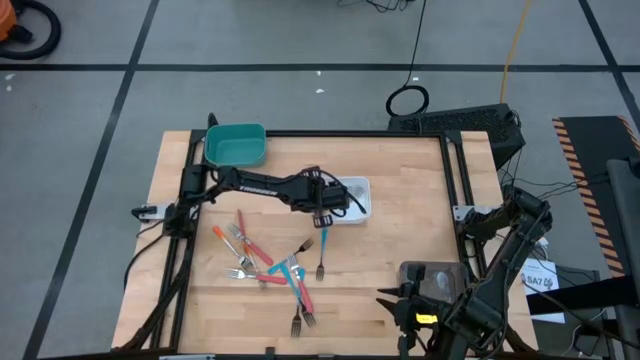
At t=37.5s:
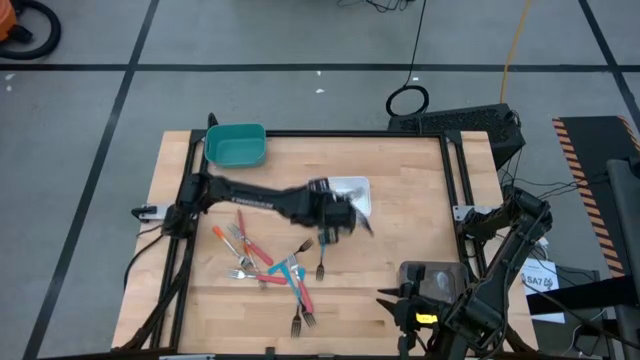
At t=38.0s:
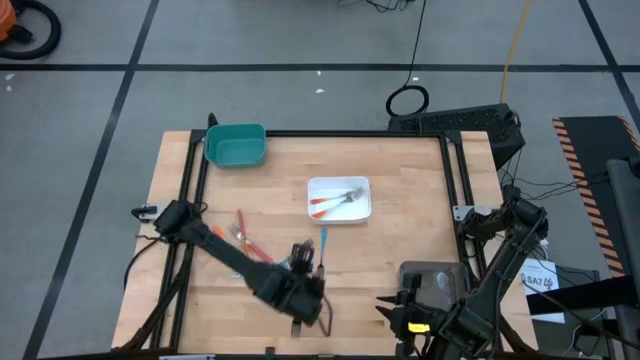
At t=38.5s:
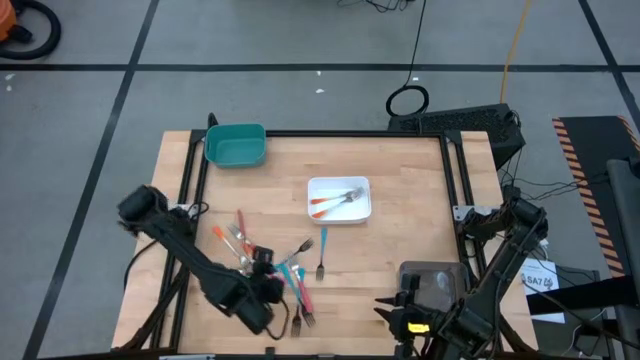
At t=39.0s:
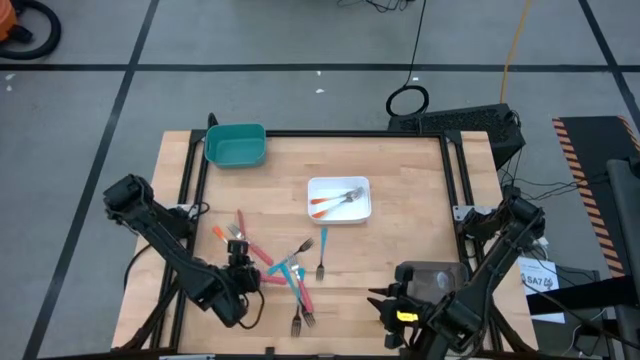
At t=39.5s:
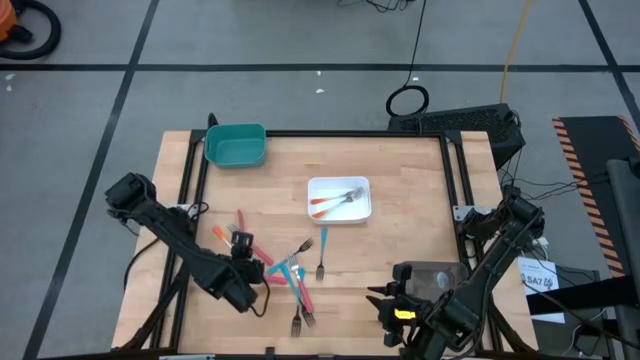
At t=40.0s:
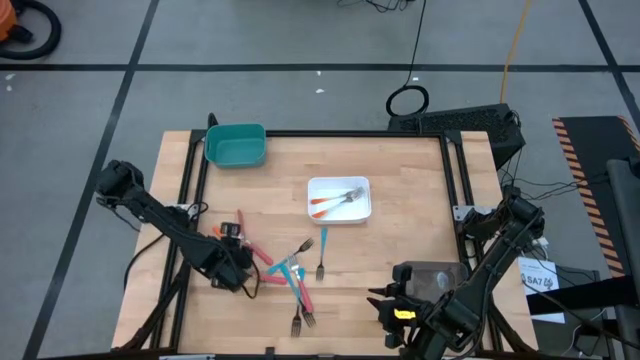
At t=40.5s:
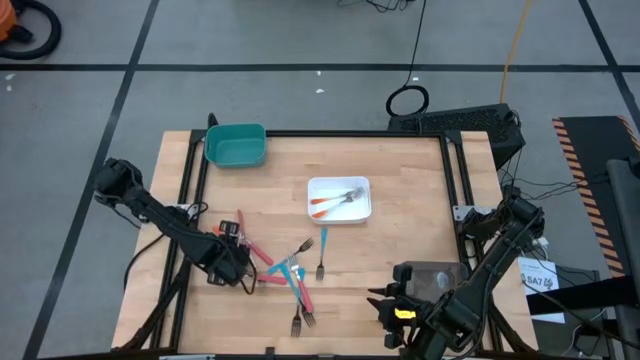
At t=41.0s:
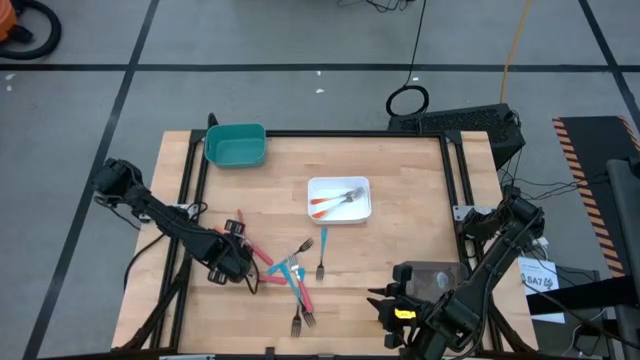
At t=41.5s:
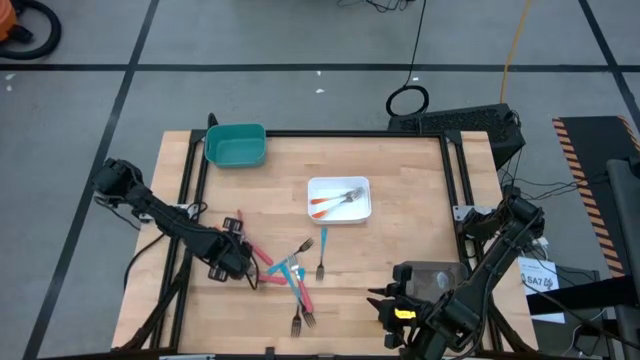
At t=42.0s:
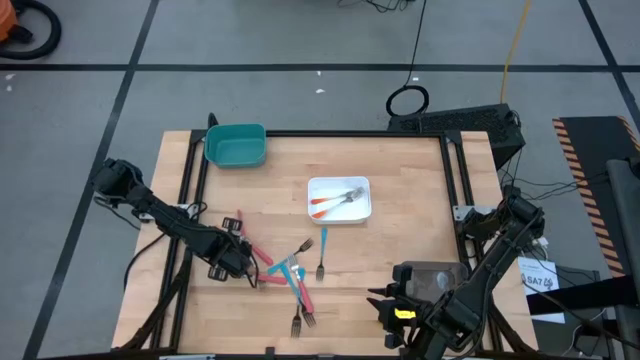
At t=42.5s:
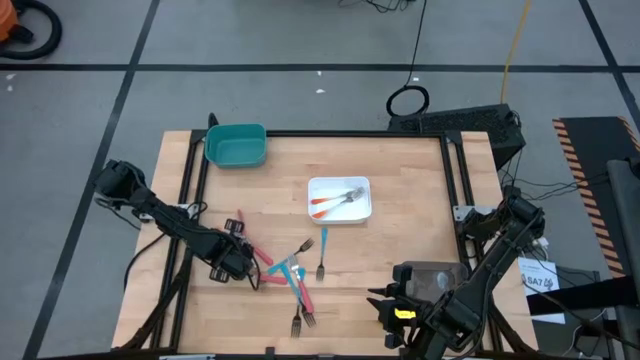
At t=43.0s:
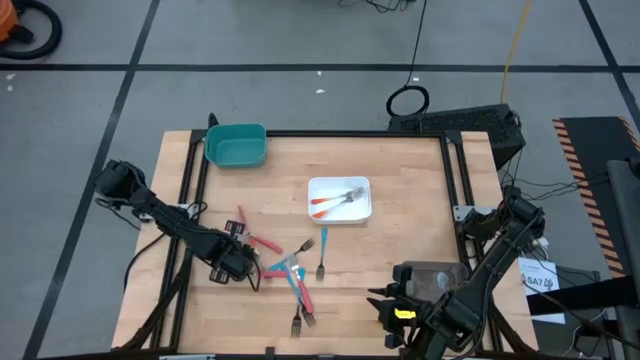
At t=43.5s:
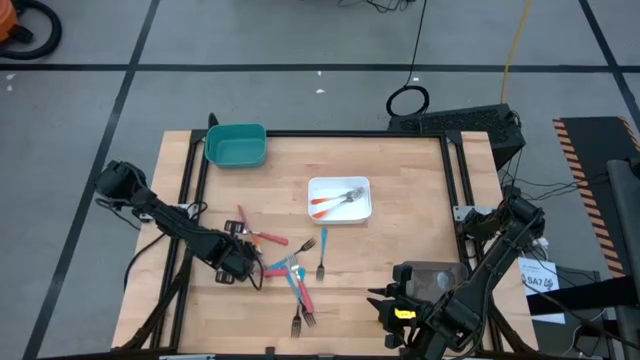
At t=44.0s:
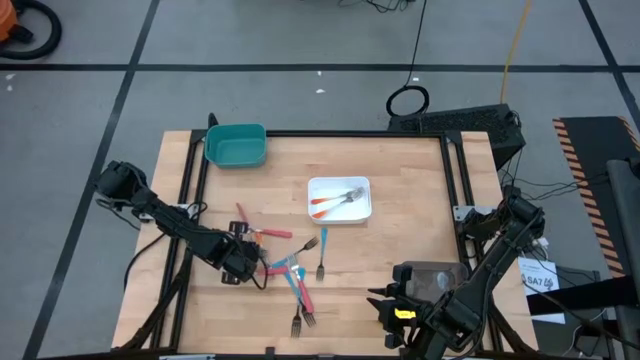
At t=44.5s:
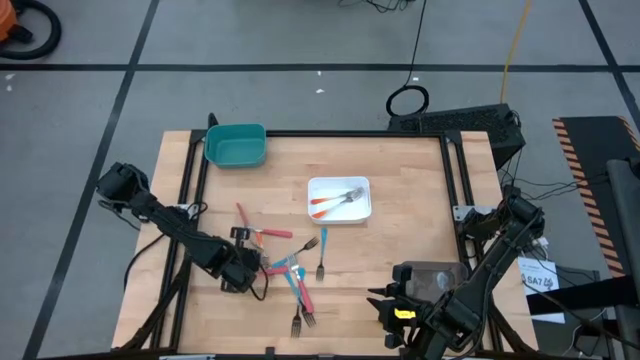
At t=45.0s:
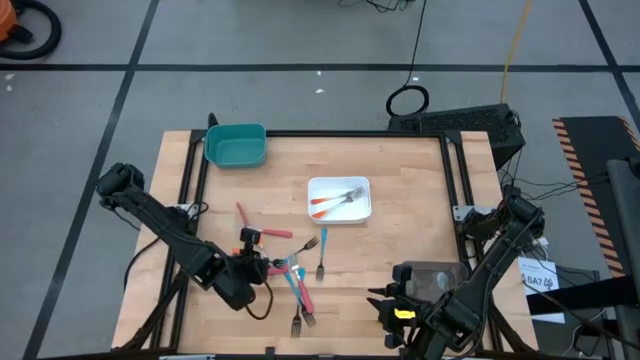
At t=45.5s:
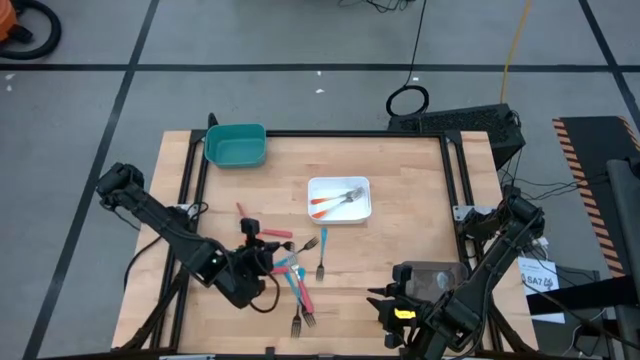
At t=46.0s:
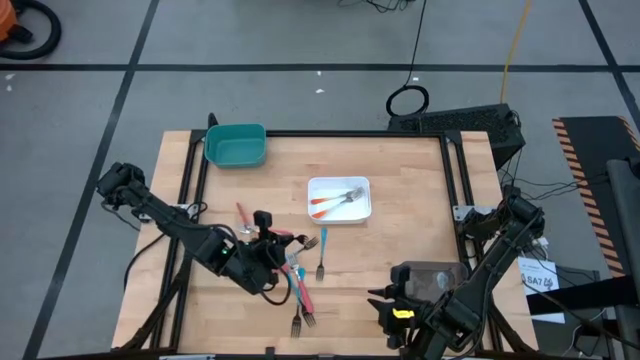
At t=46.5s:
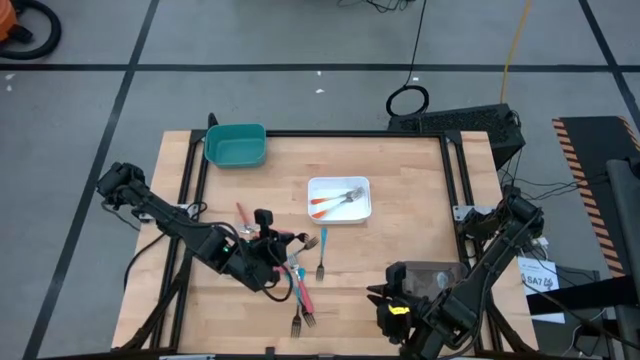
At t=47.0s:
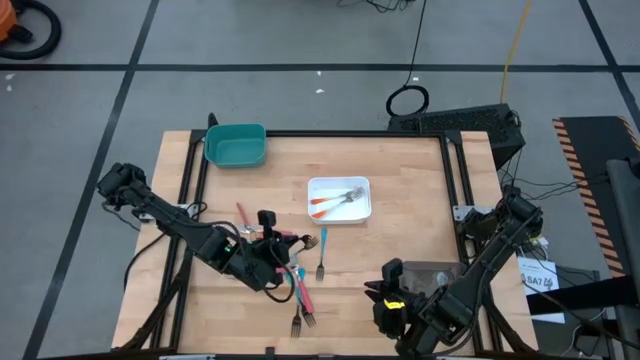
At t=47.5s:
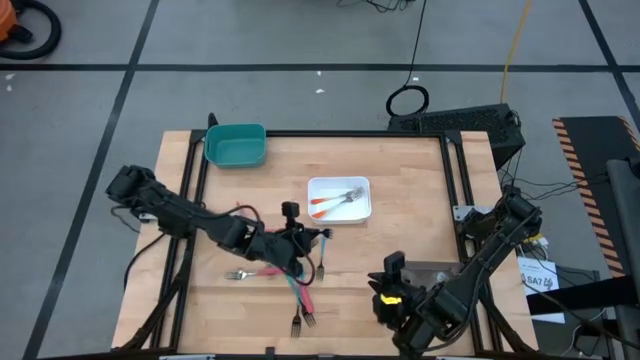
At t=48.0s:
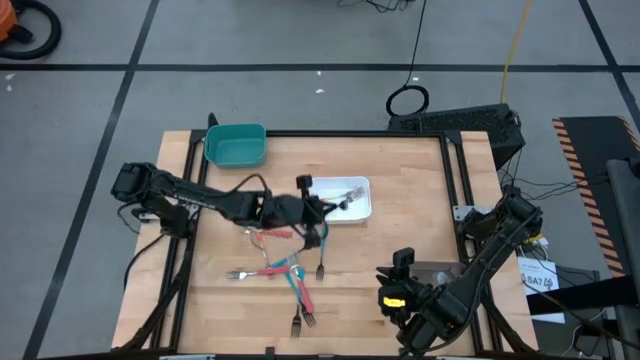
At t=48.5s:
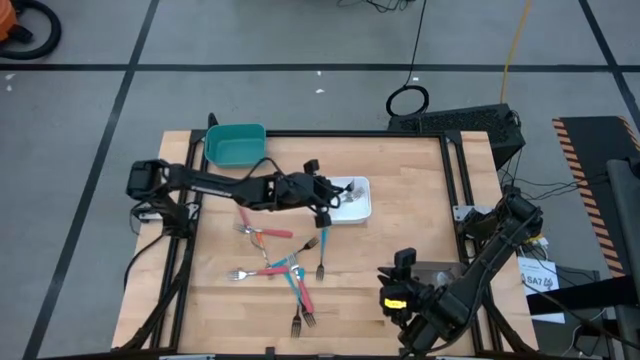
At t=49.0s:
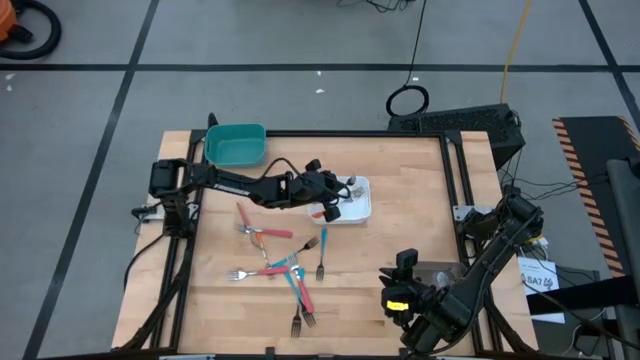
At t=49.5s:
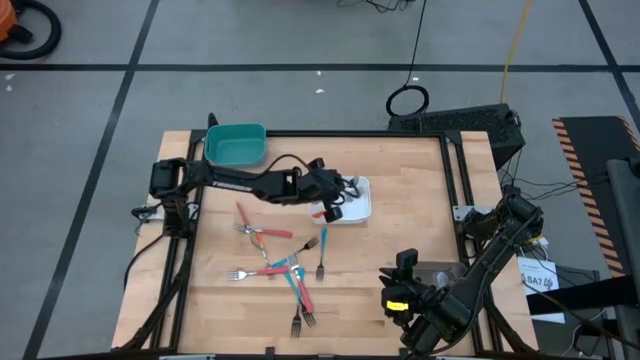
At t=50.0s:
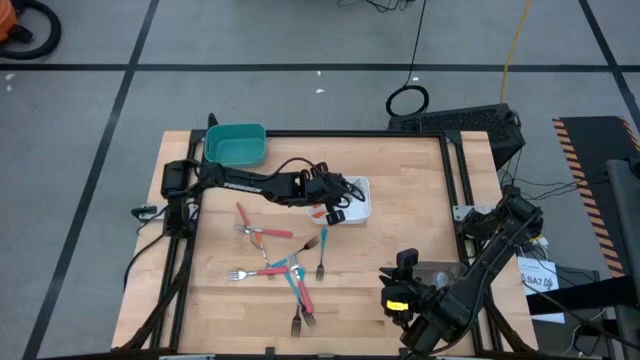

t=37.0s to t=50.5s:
Task: Sort silverware by color (type)
Put the orange fork into the white bin

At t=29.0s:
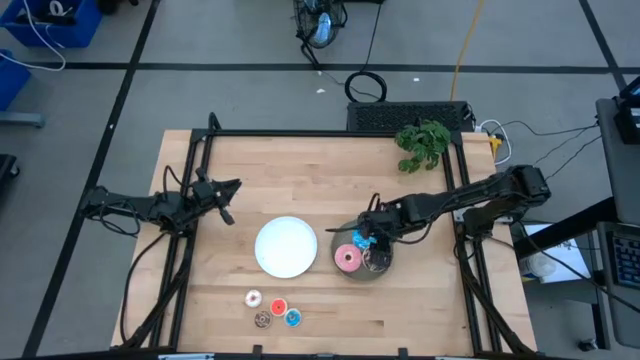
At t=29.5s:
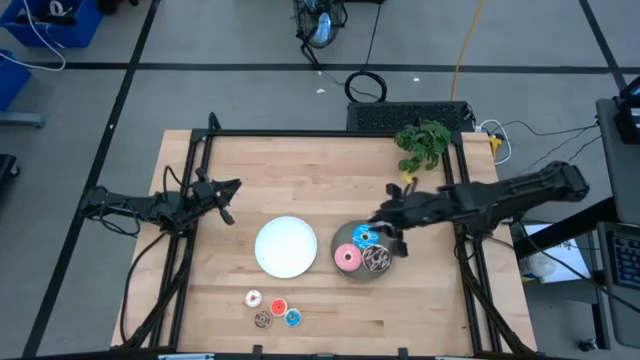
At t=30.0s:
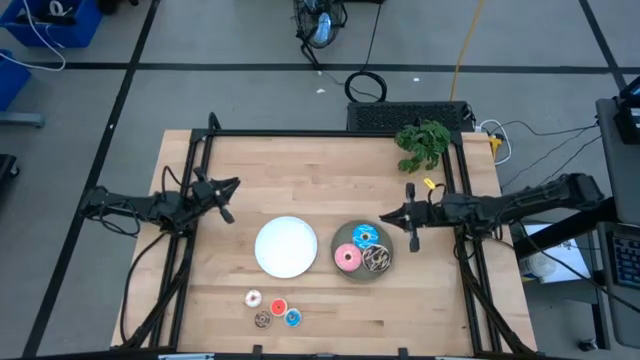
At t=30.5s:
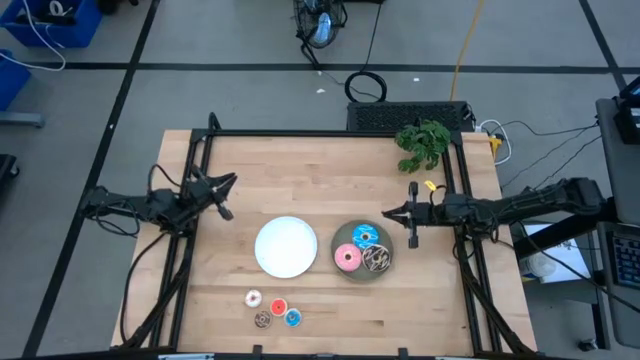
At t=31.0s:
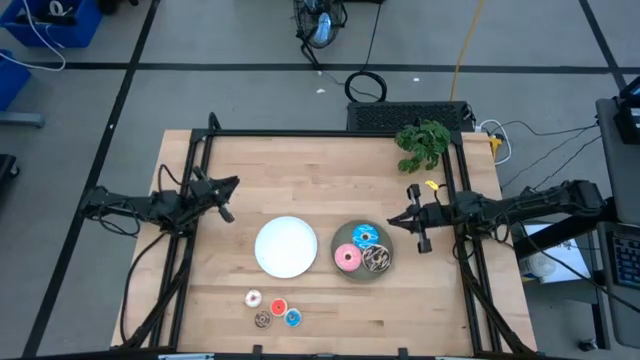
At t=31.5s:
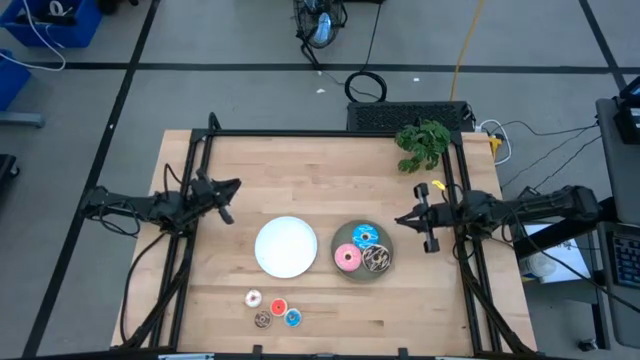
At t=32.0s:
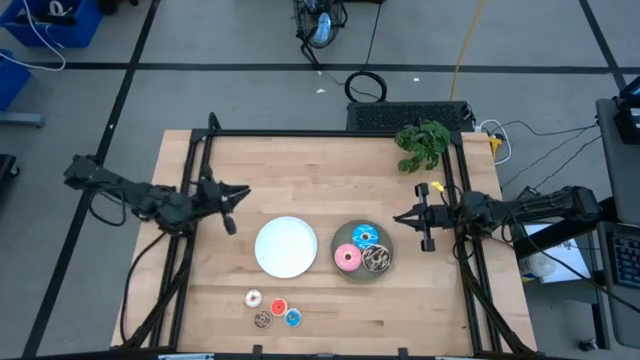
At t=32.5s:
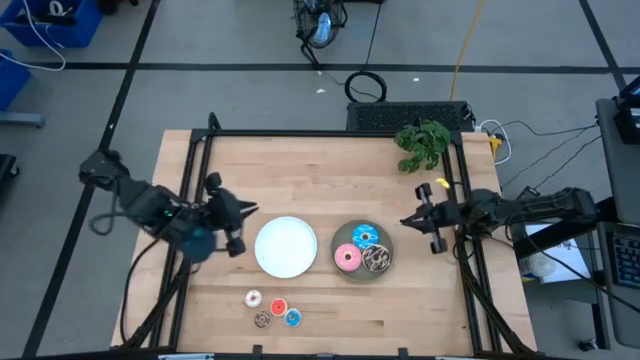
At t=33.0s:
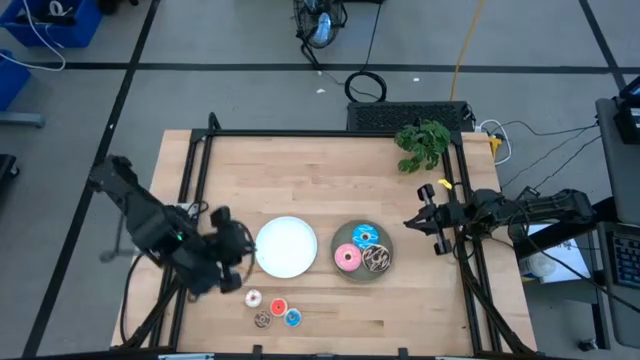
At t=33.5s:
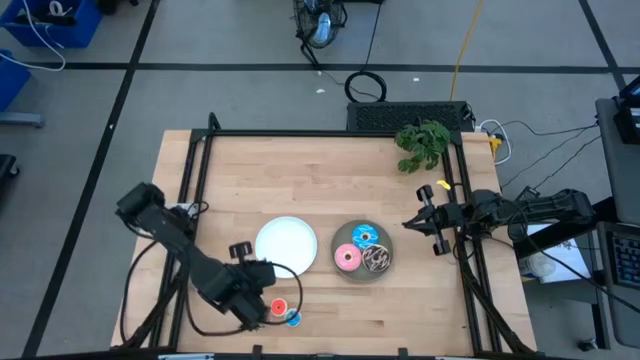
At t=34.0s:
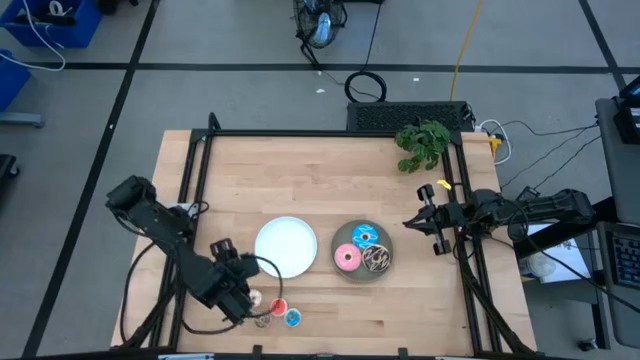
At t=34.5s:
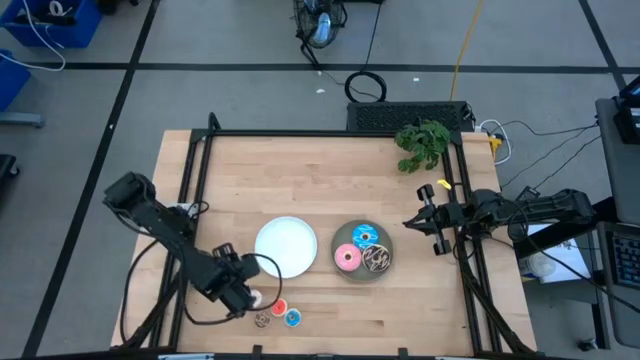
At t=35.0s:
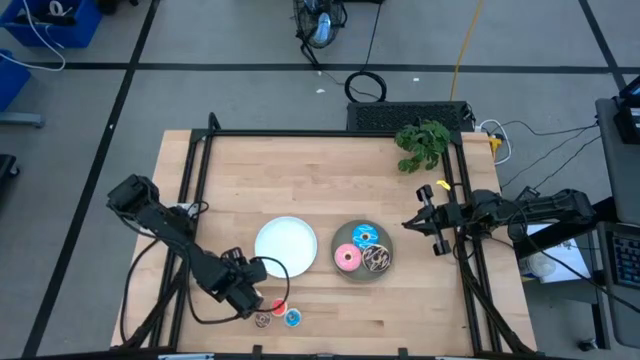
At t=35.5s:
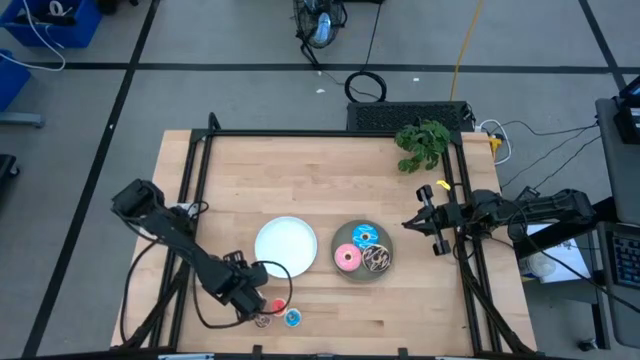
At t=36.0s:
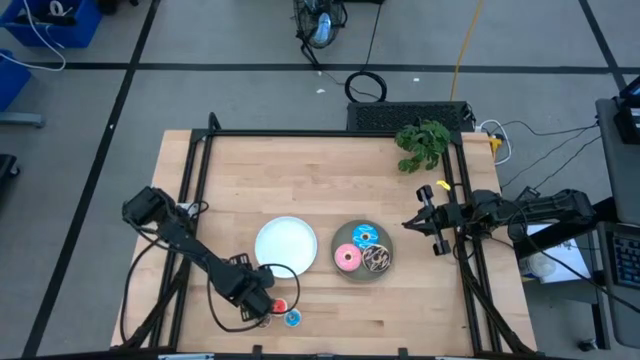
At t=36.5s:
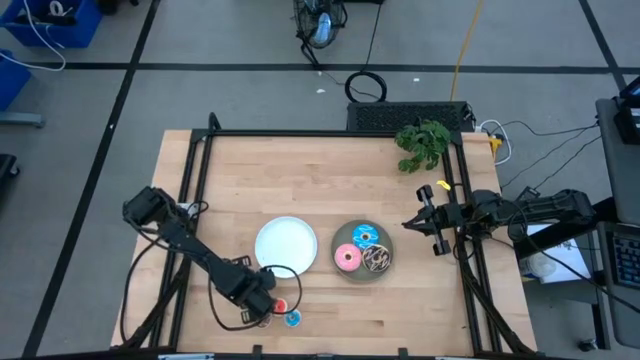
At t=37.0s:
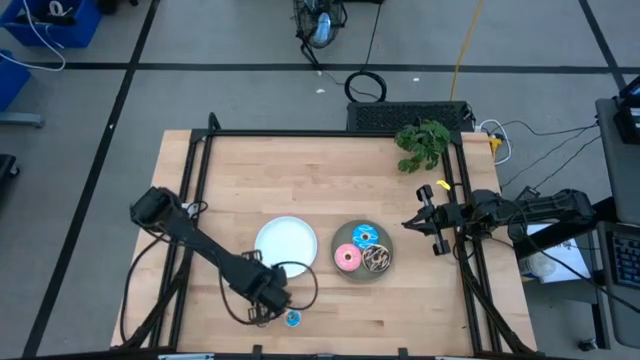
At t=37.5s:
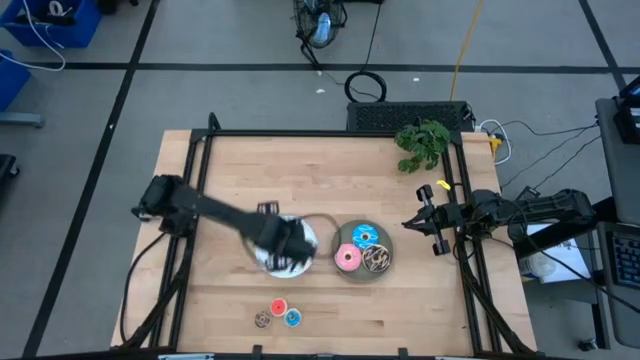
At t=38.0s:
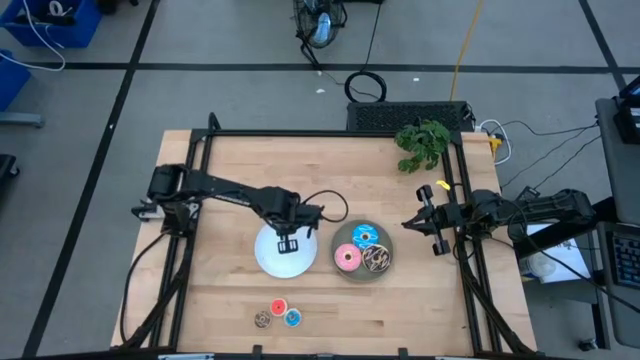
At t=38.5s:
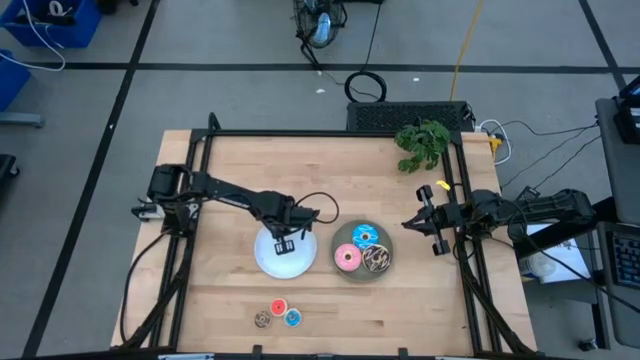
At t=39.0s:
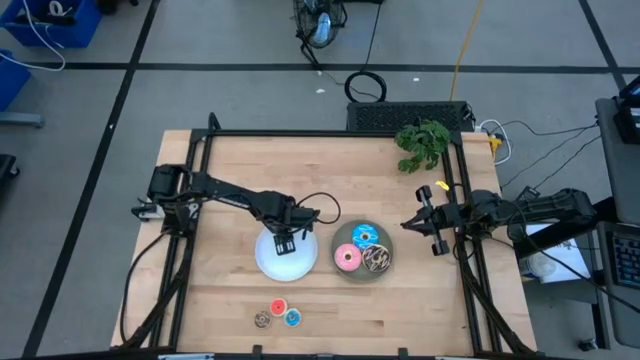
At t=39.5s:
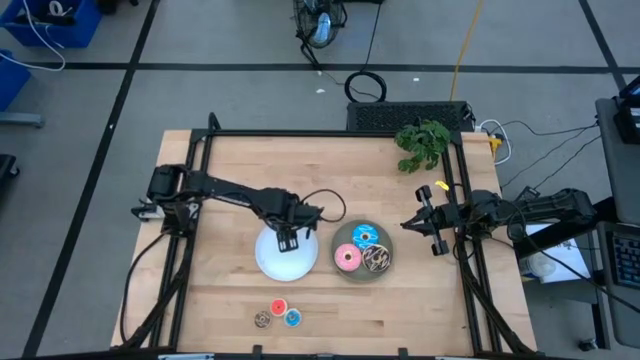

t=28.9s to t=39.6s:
Task: Pick & Place donuts
Put the small white donut on the white plate
